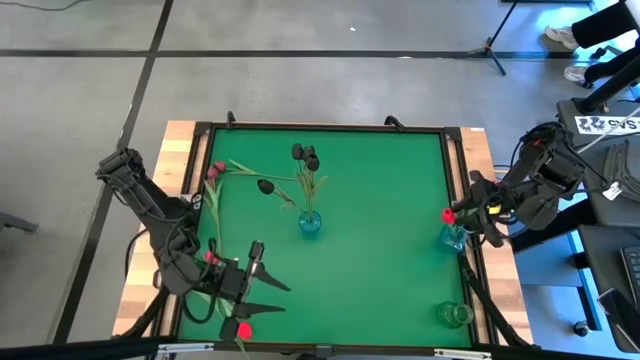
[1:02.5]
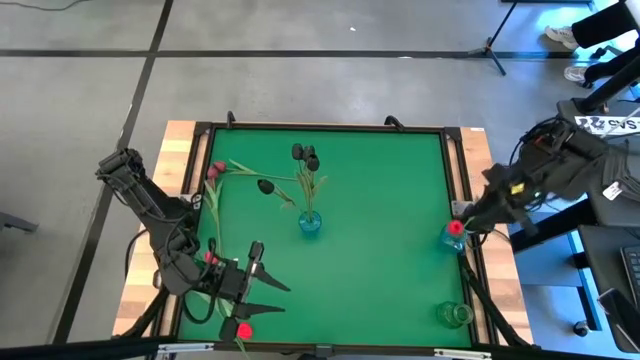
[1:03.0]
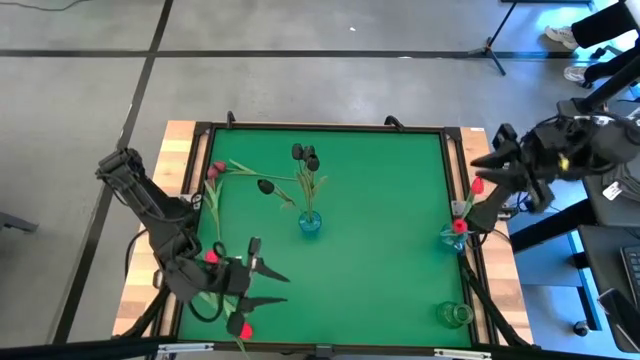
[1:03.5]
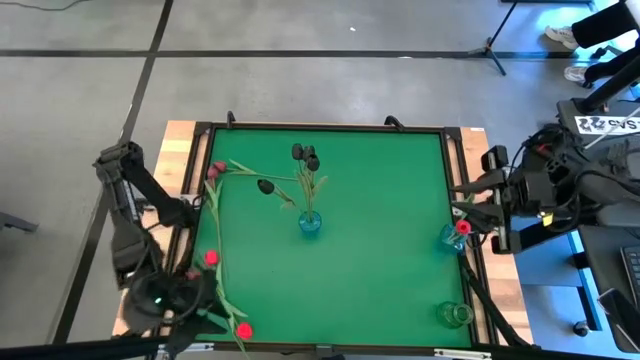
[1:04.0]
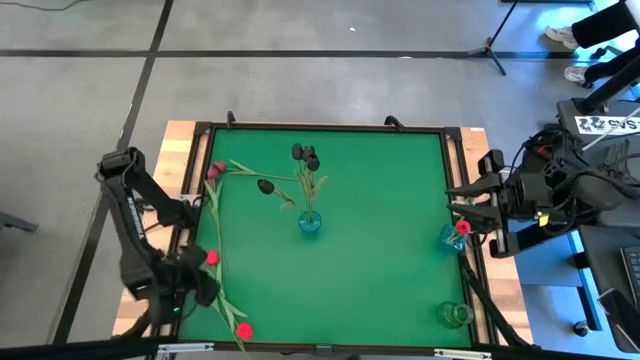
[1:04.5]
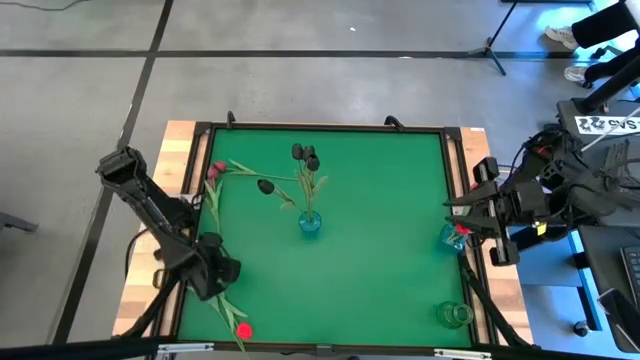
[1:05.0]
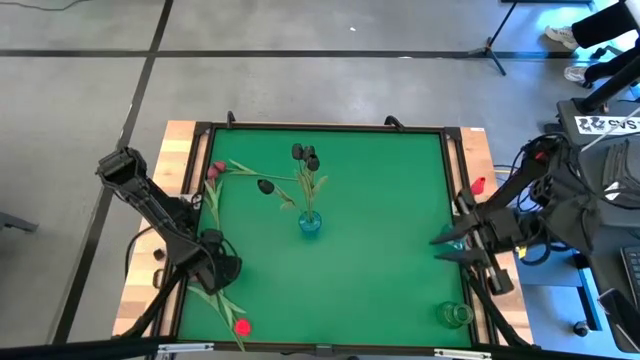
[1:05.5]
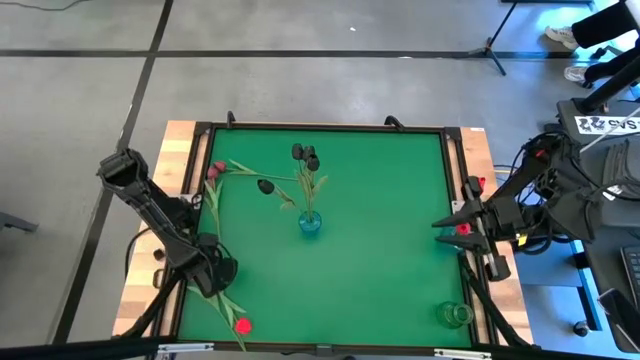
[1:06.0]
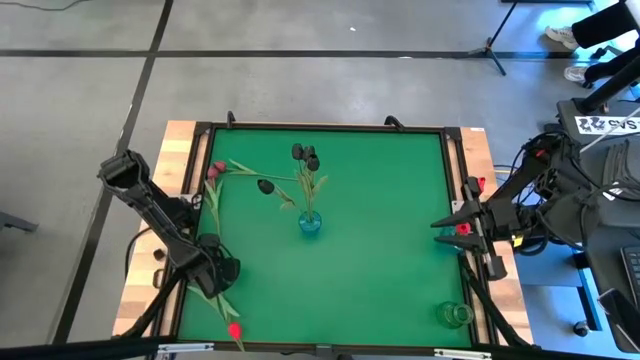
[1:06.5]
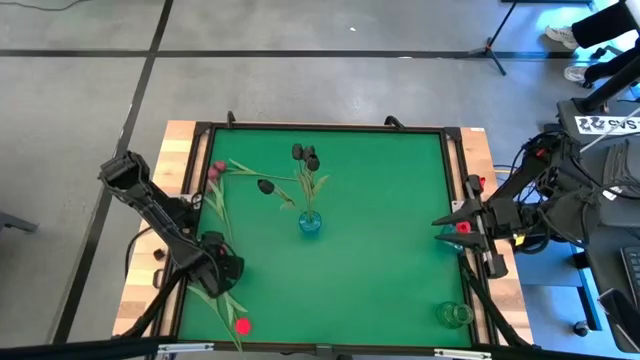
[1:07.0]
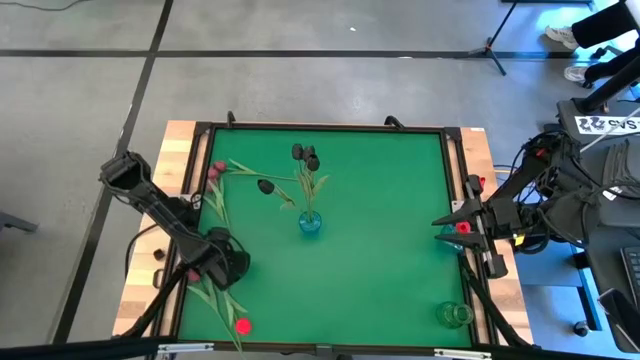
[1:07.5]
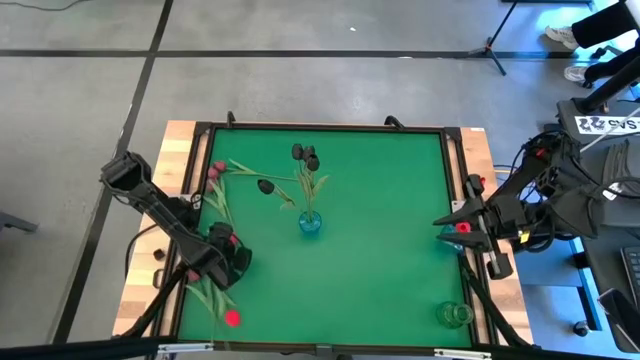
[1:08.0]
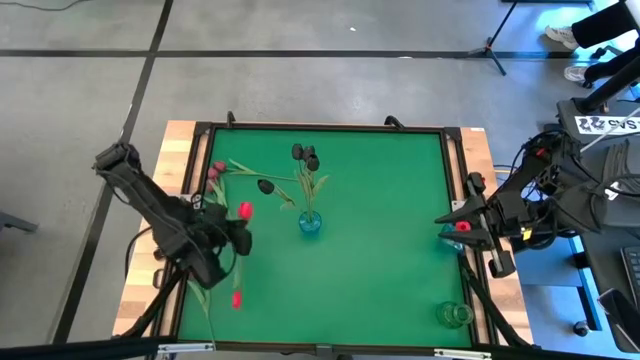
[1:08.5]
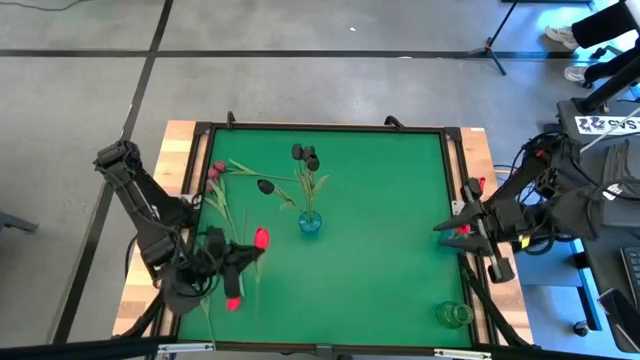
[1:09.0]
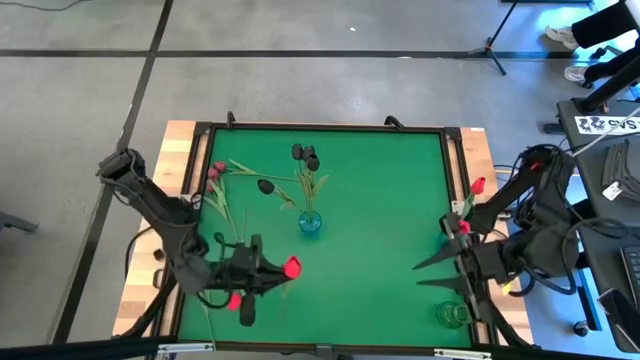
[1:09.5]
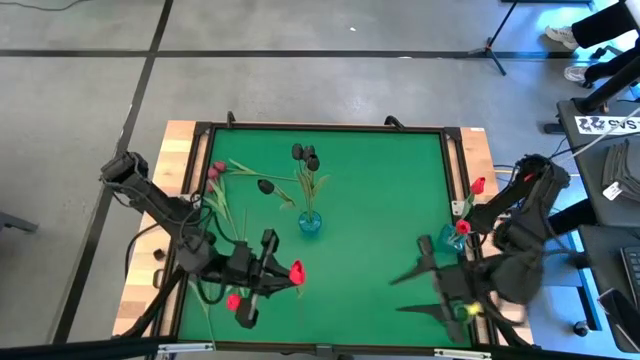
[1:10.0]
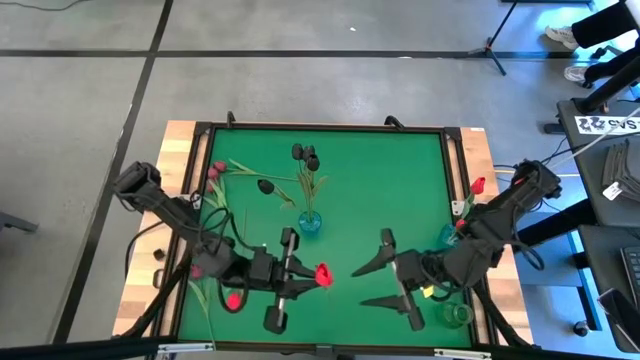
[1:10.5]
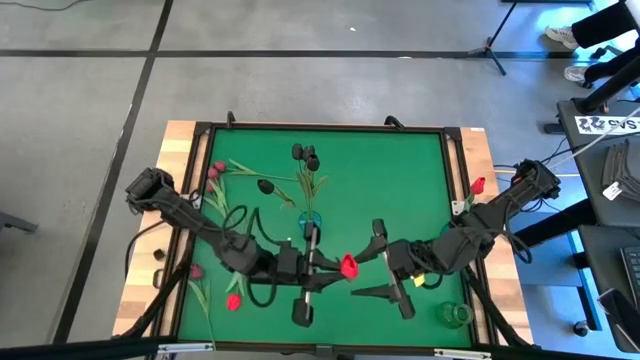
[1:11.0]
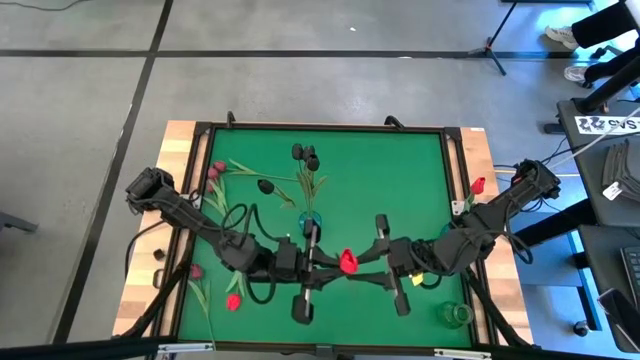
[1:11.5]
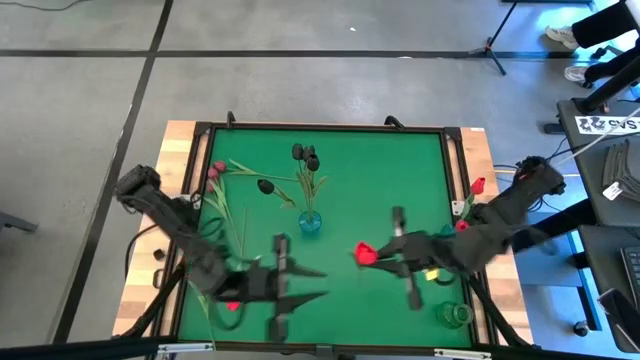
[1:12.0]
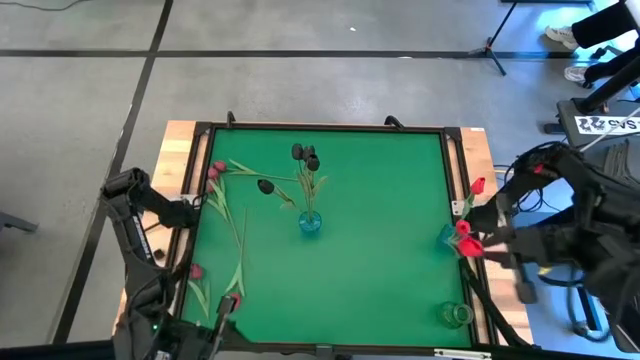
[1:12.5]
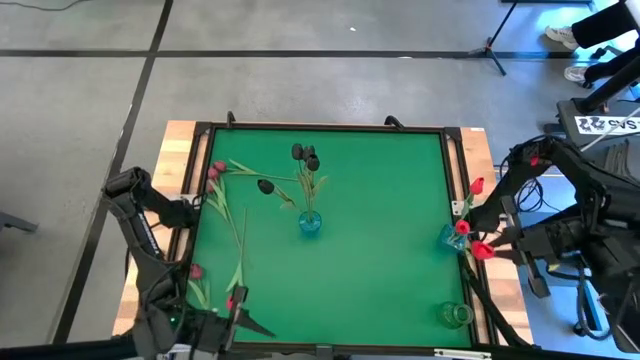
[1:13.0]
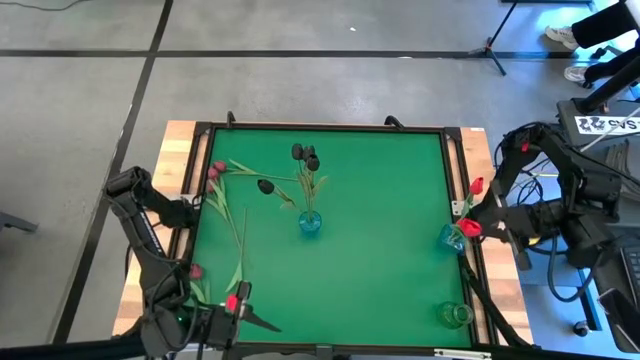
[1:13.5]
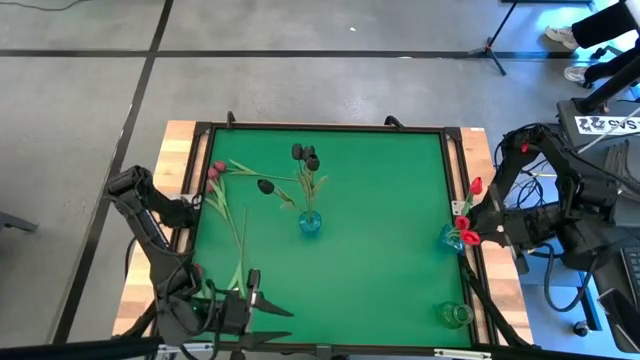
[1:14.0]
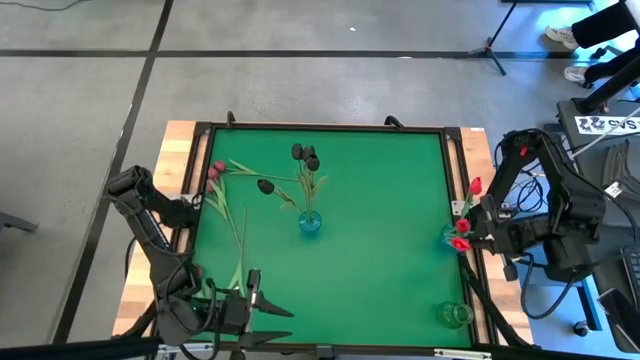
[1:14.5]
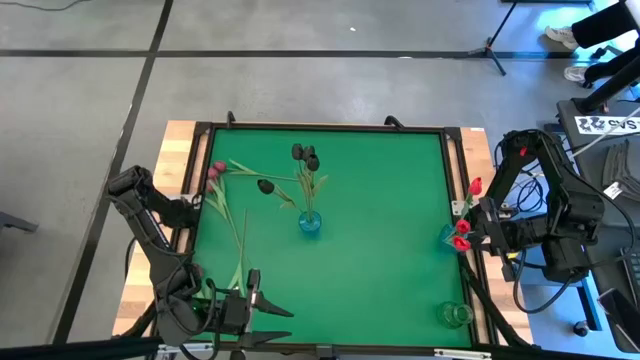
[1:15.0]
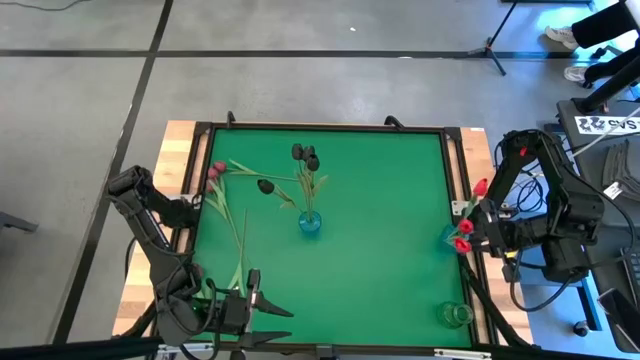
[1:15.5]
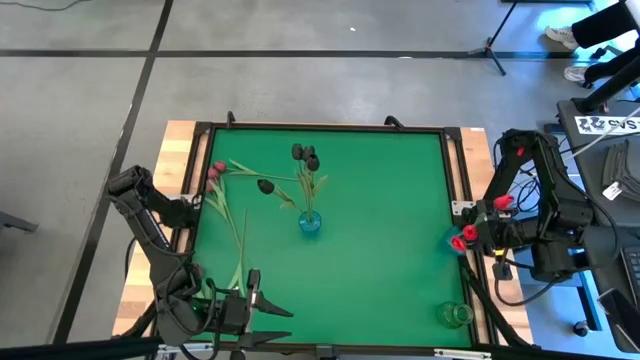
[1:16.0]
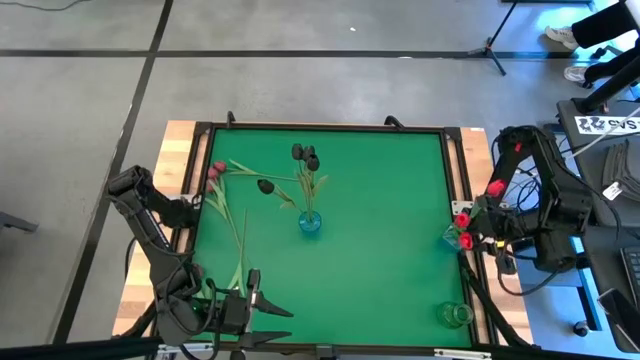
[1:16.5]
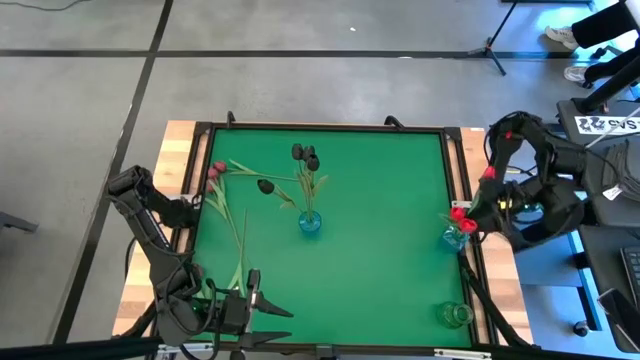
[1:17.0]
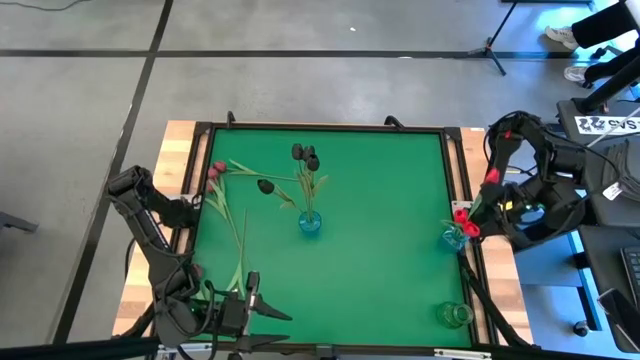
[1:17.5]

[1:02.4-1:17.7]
Task: Sort flowers into vase by color
Put the red flower into the right blue vase

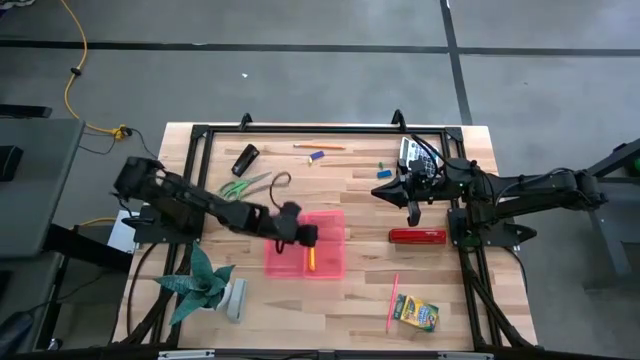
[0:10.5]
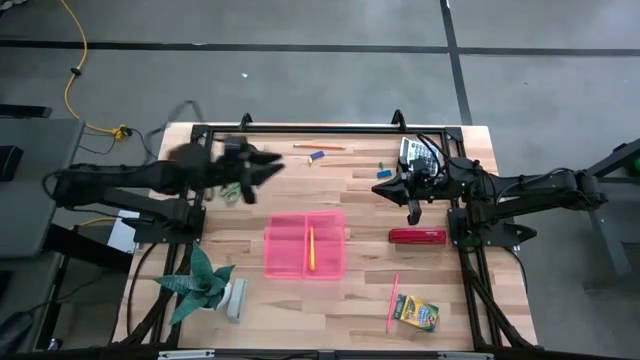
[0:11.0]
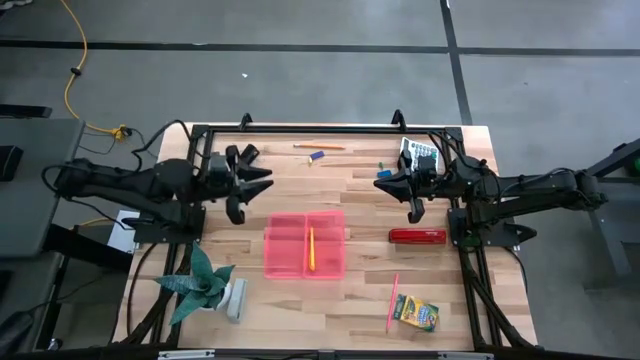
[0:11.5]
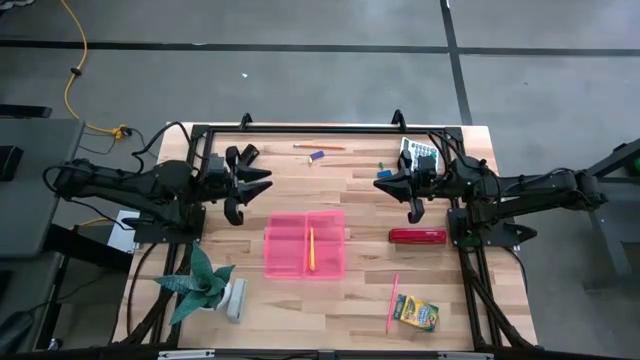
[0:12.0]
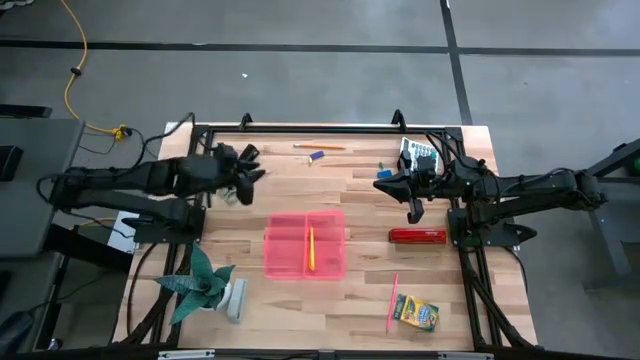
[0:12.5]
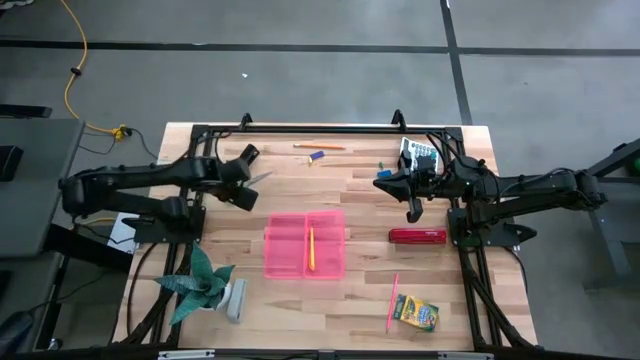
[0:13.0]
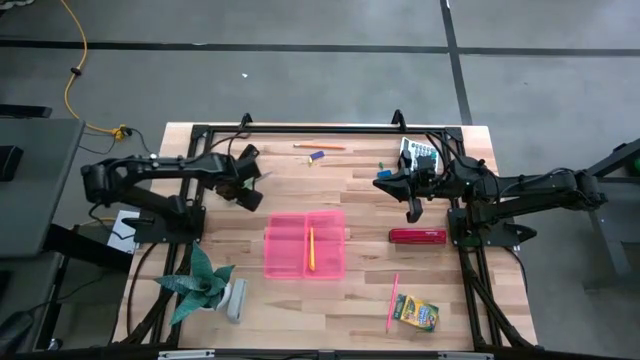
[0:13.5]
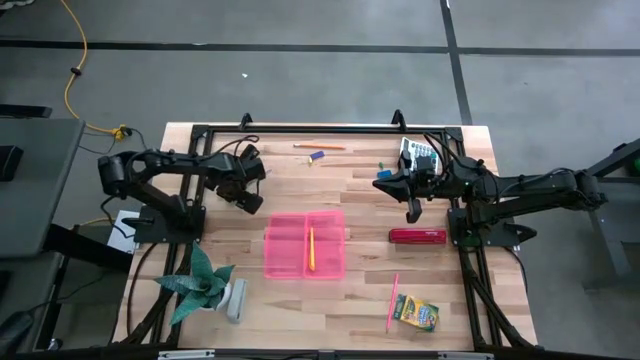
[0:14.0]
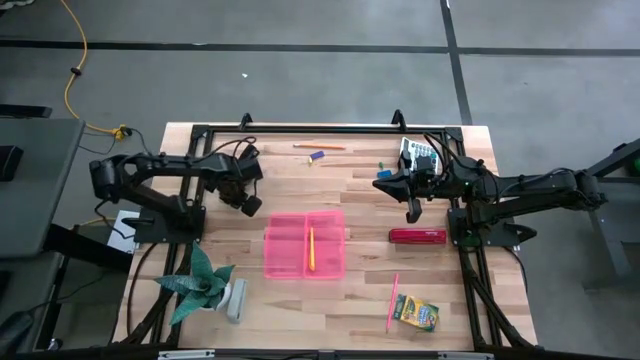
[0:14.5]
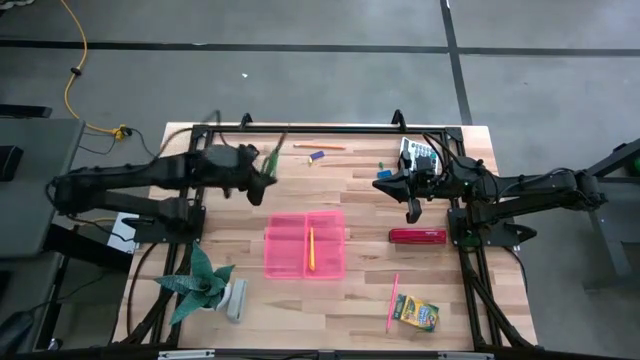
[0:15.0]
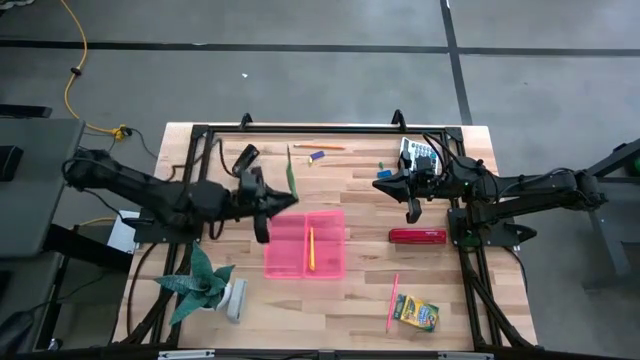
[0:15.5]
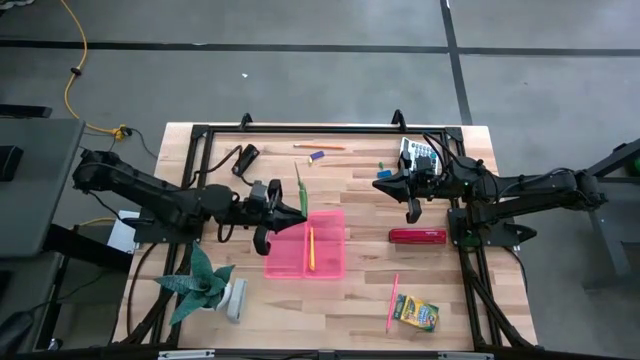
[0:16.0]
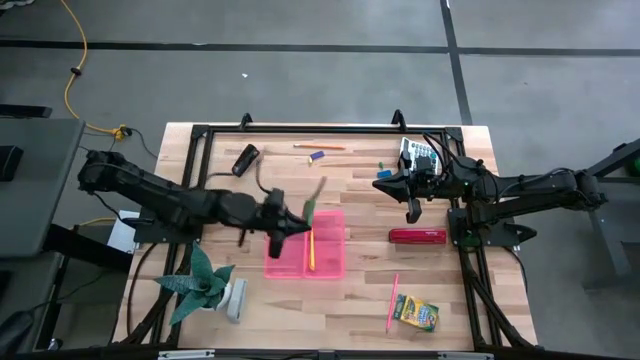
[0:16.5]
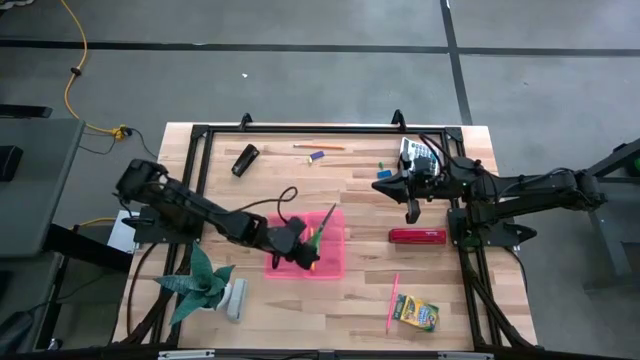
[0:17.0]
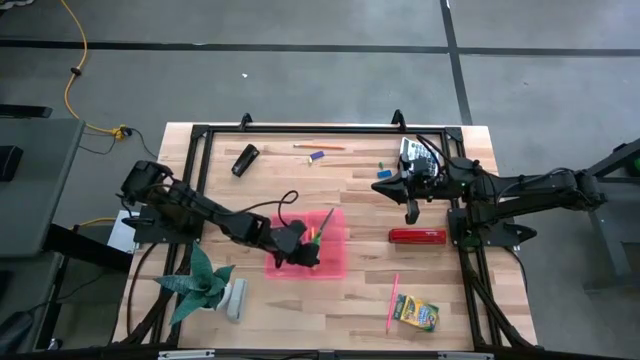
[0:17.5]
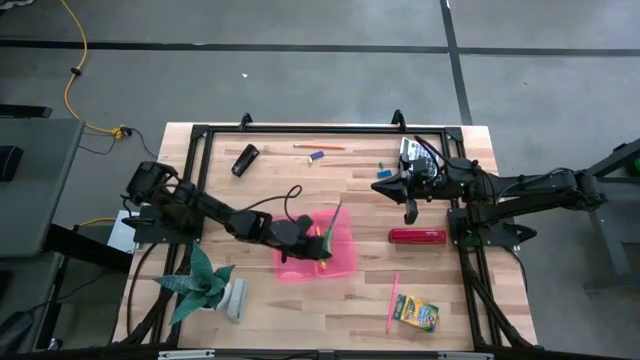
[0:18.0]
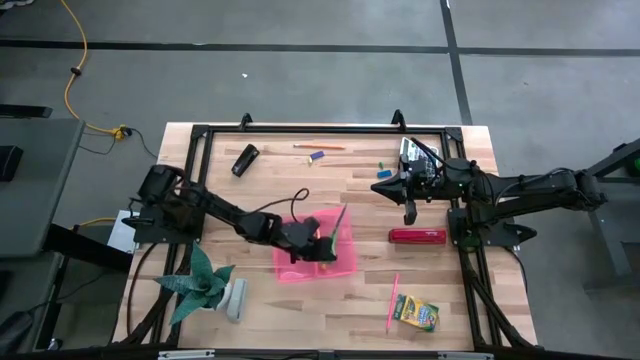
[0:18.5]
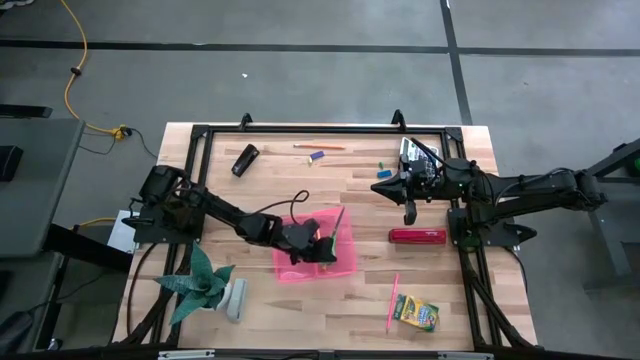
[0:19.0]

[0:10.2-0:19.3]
Task: Pack school essentials
Put the green scissors into the pink supply box
